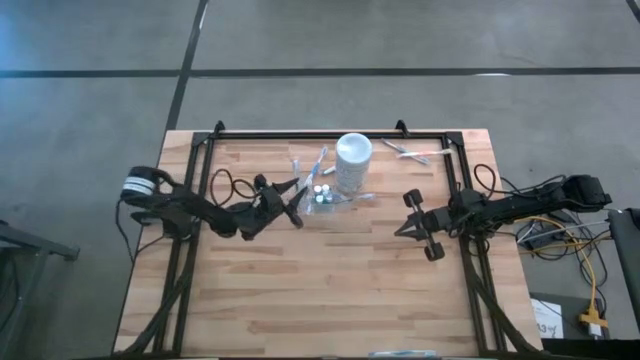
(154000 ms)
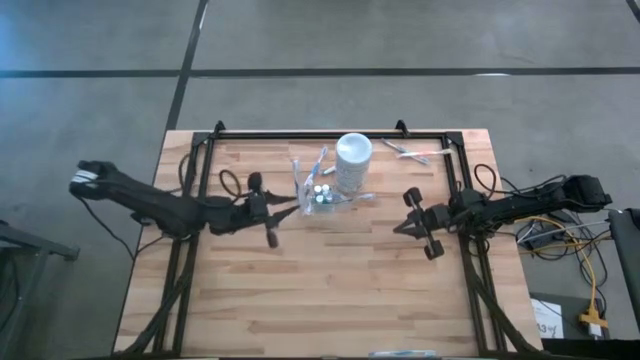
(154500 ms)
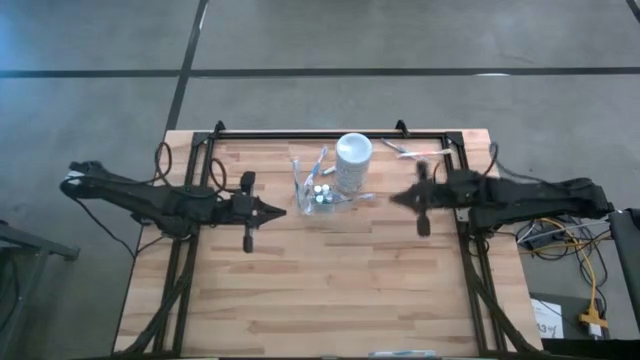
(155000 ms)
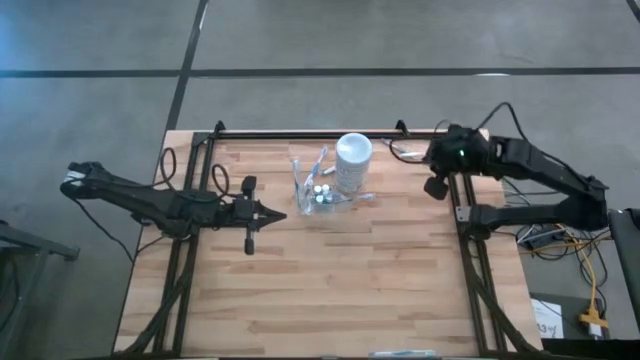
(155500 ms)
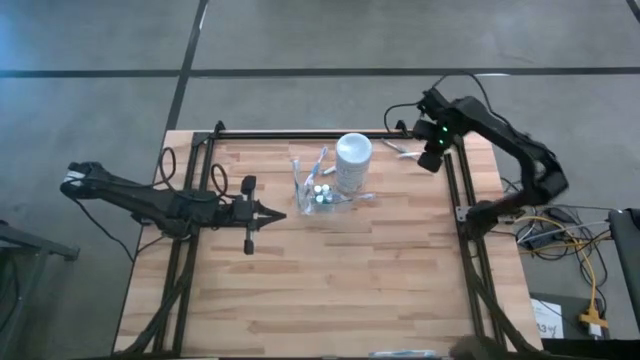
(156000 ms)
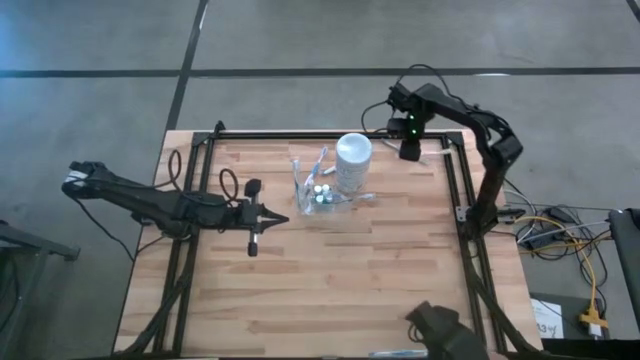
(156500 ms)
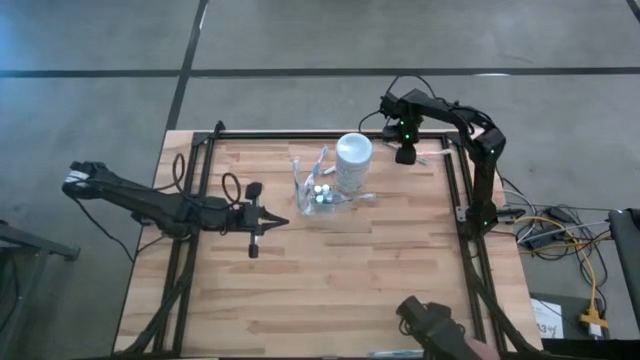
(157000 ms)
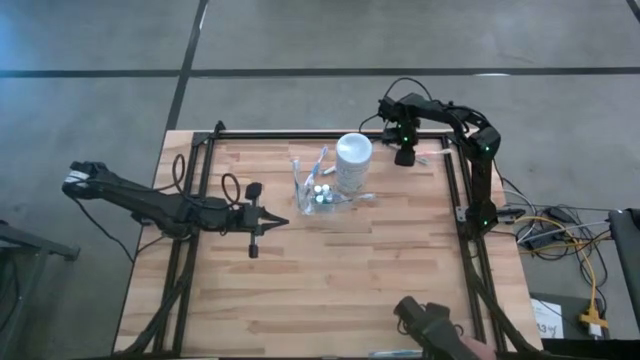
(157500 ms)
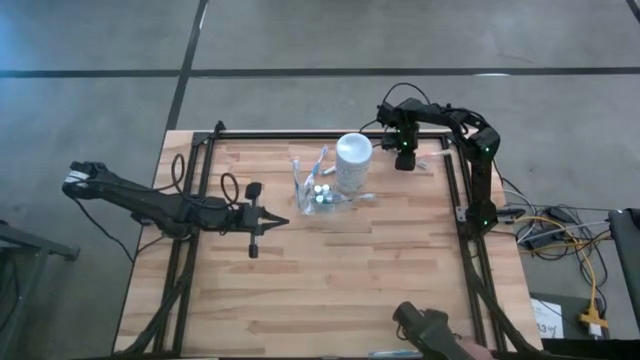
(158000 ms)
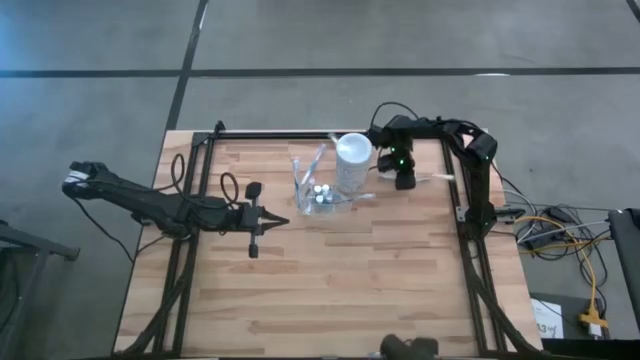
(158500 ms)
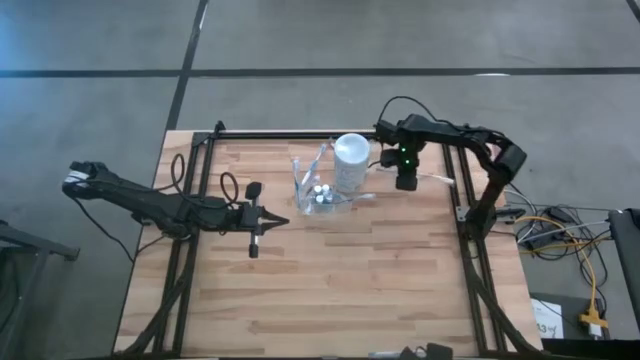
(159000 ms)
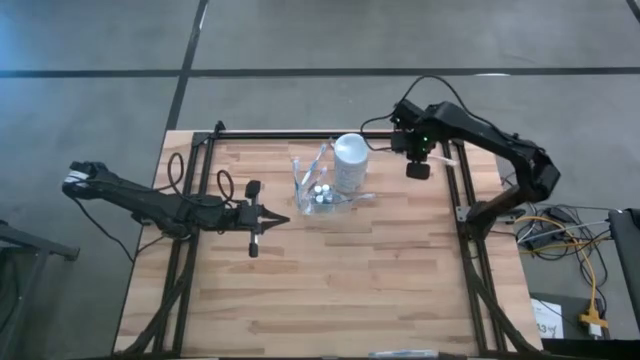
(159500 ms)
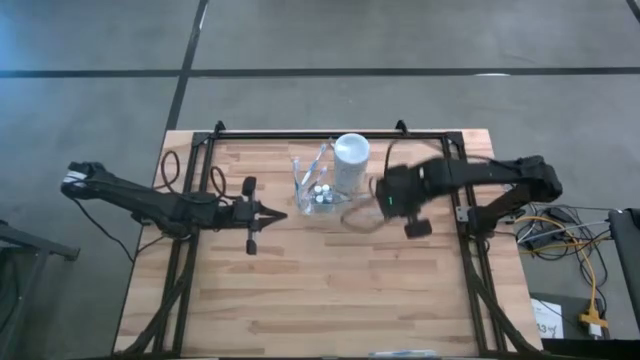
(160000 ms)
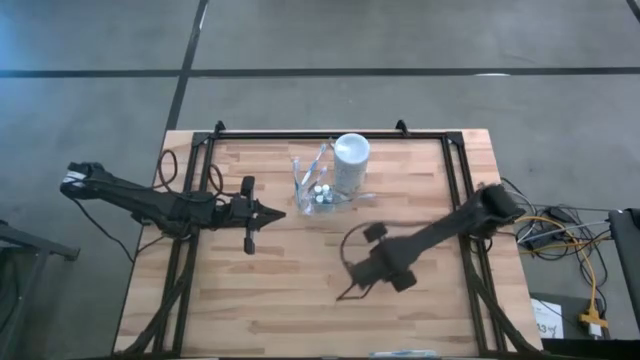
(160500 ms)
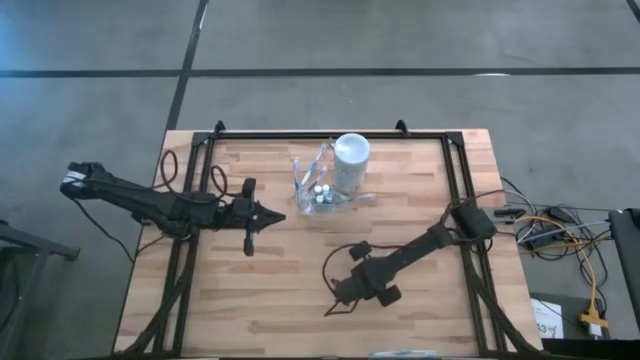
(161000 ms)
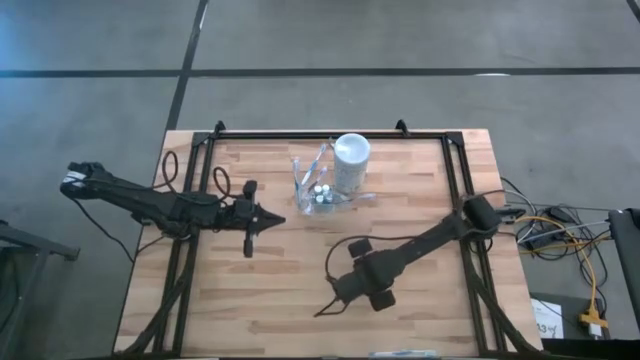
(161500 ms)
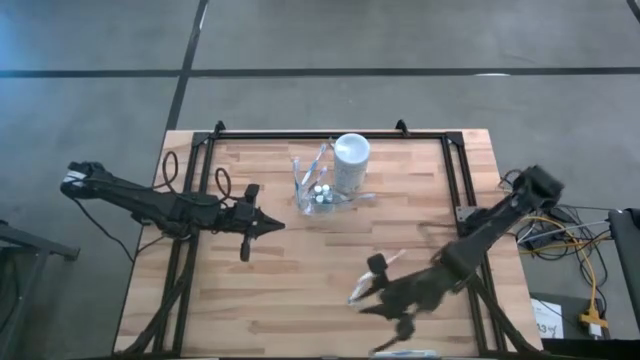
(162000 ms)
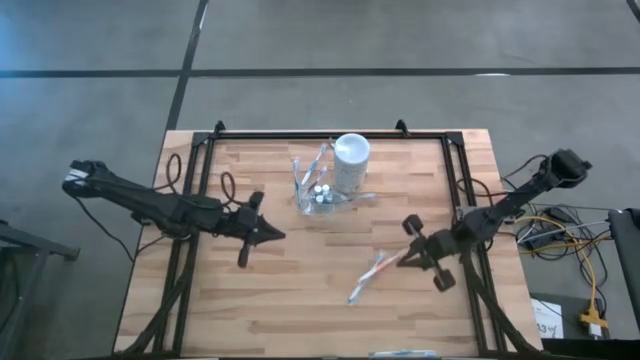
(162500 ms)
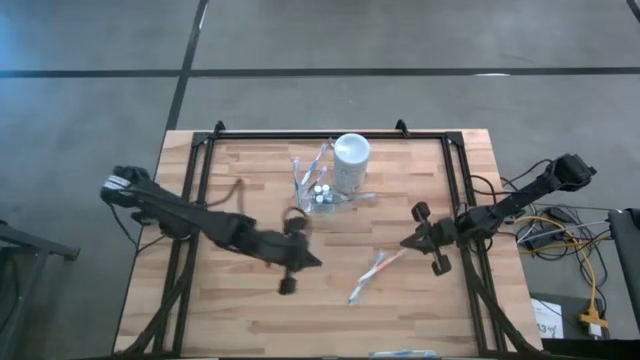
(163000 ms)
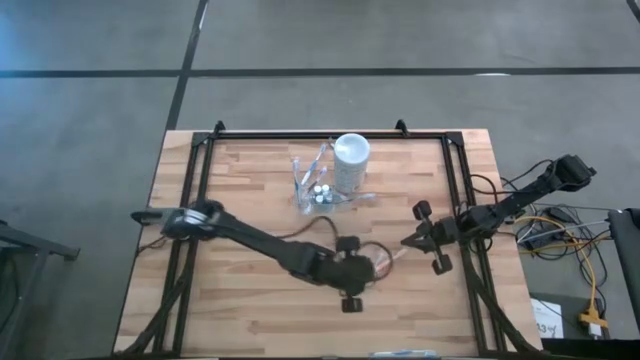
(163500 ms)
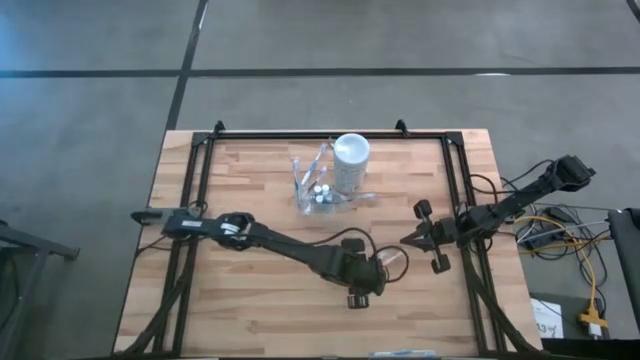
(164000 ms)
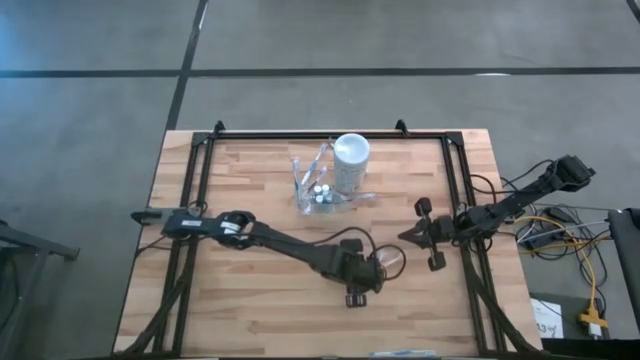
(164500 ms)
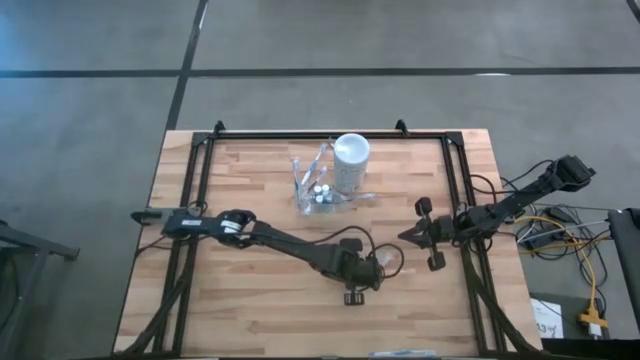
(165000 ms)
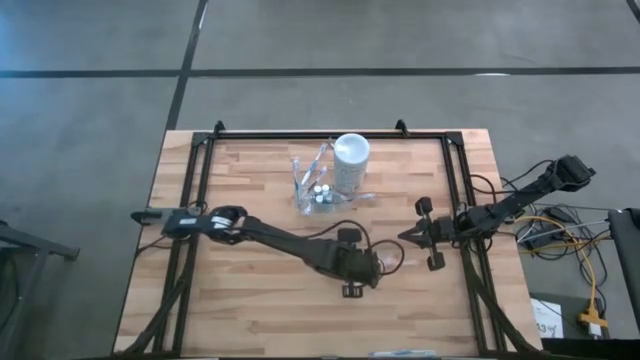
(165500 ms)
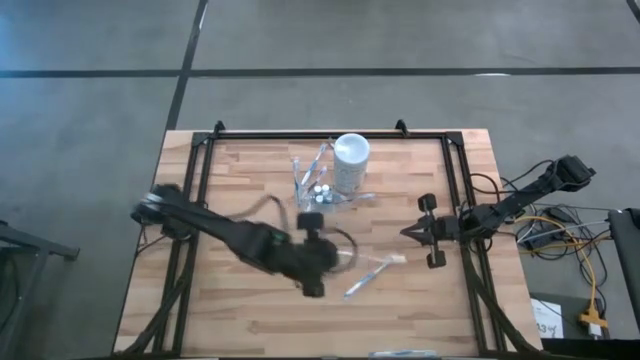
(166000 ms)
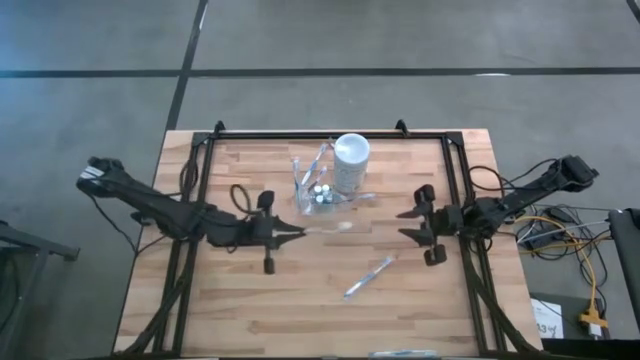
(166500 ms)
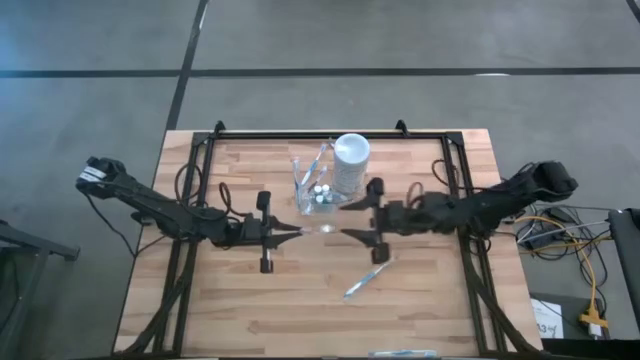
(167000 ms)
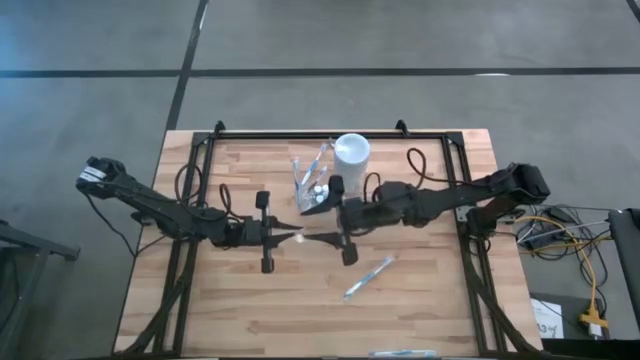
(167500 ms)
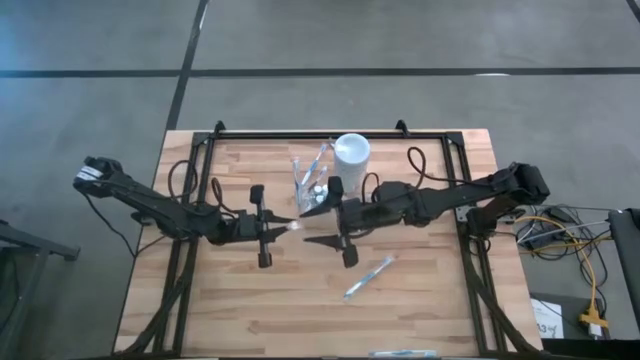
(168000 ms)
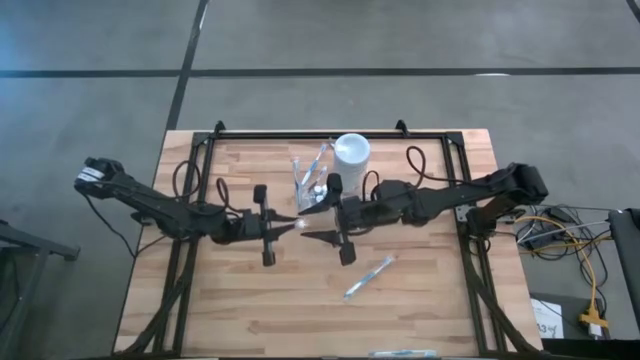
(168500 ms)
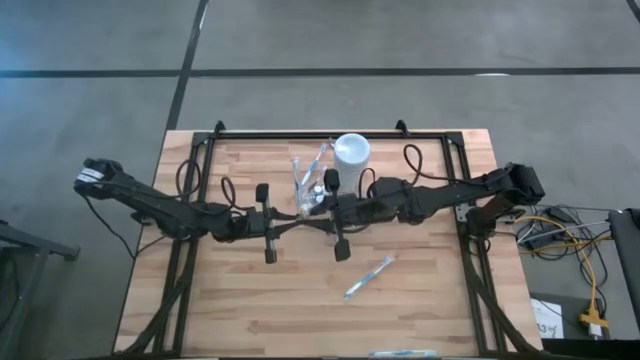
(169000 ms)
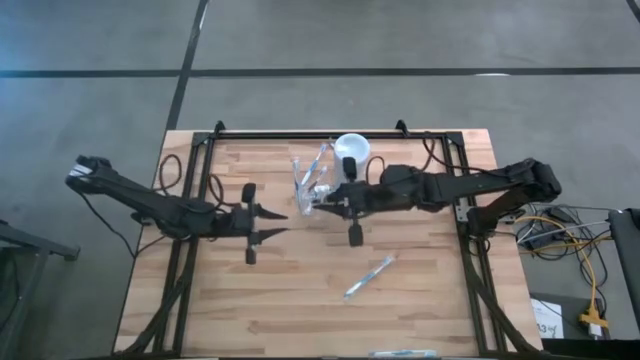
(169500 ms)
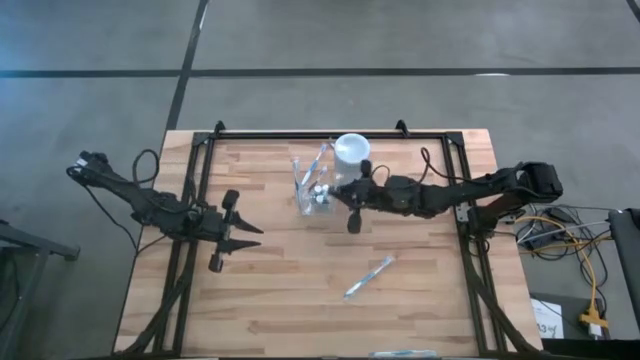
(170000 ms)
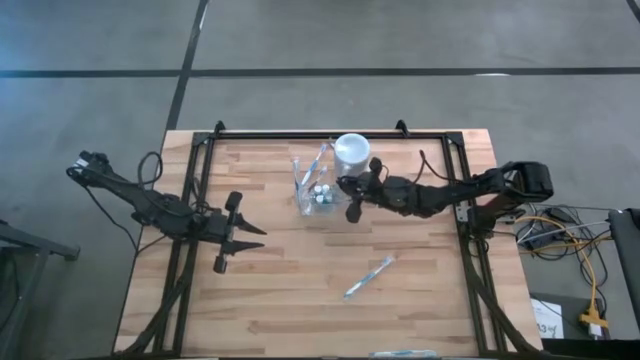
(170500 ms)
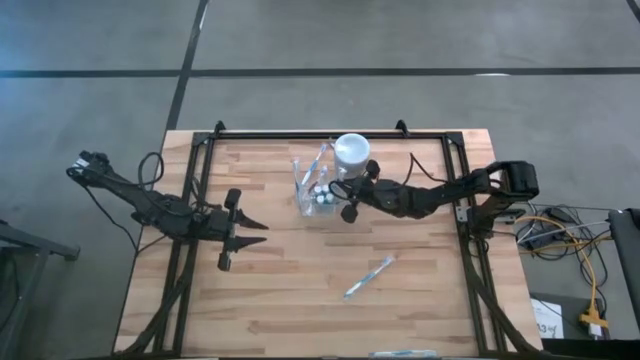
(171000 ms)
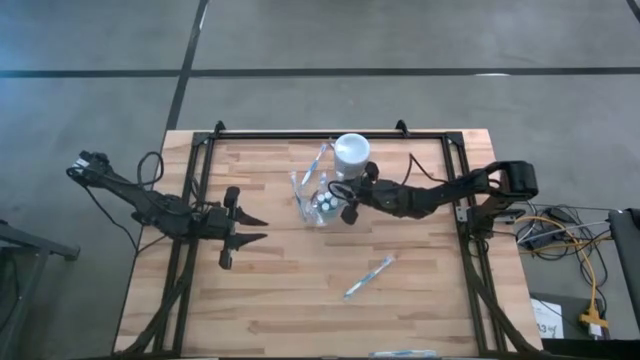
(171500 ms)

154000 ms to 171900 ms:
Task: Pick & Place toothbrushing station
Put the orange toothbrush into the transparent organizer

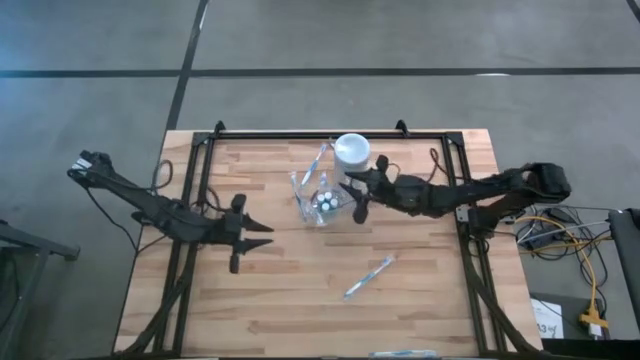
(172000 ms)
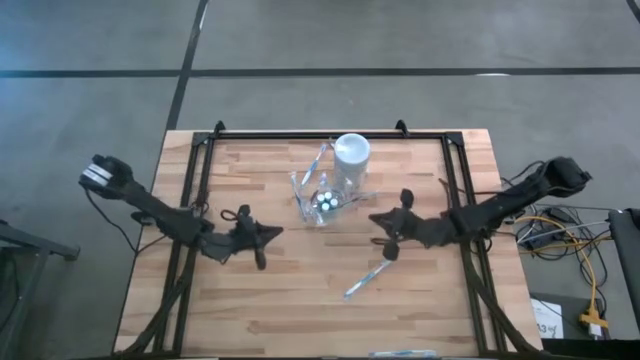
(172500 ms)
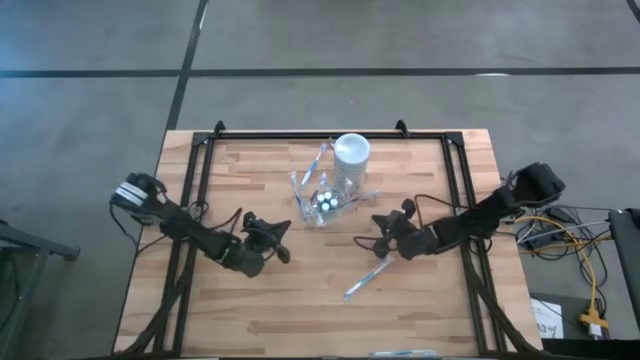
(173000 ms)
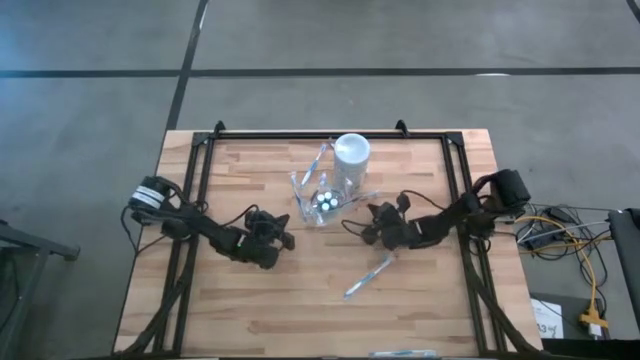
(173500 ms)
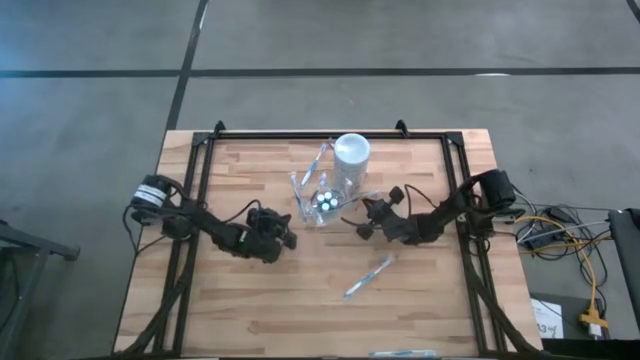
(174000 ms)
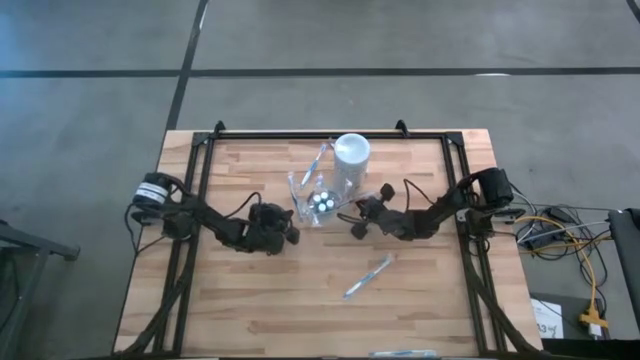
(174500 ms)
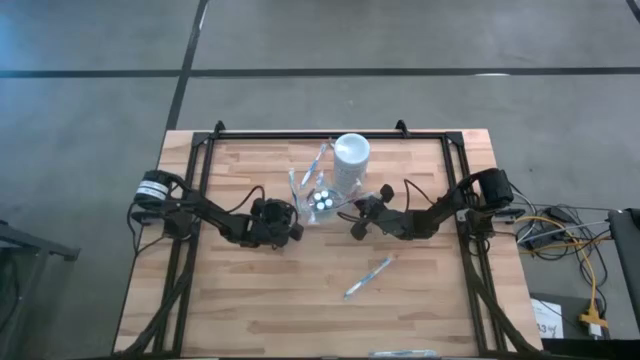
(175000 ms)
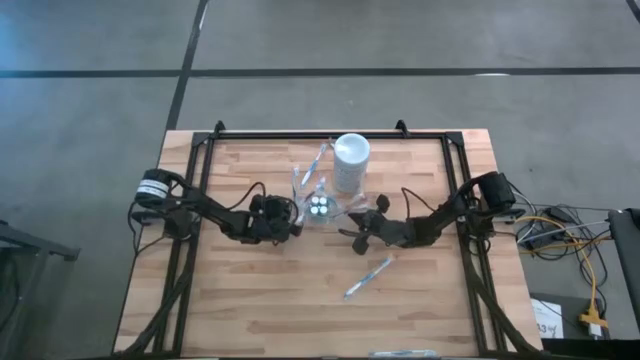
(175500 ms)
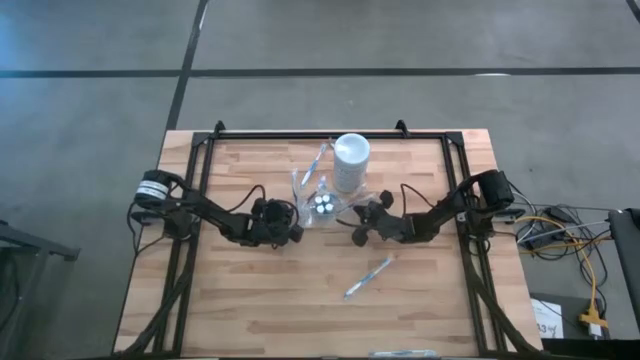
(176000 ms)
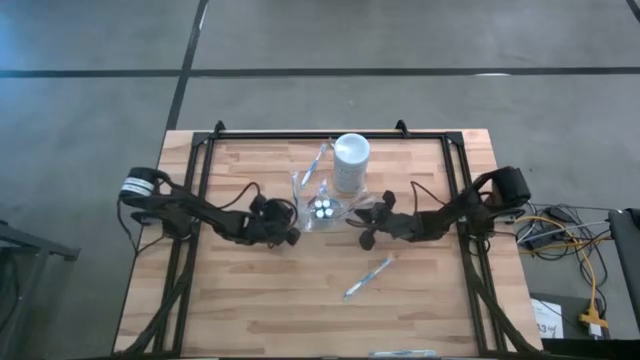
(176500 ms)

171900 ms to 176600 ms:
Adjust the transparent organizer
